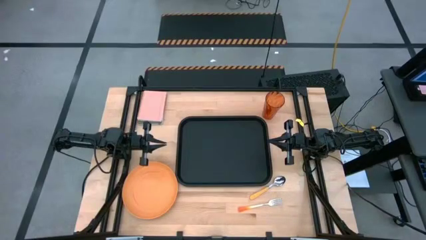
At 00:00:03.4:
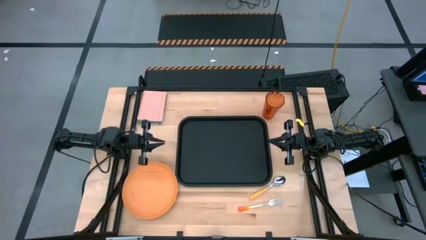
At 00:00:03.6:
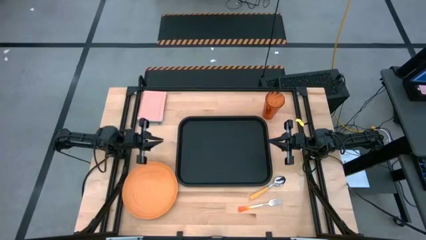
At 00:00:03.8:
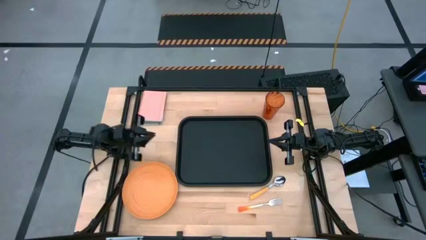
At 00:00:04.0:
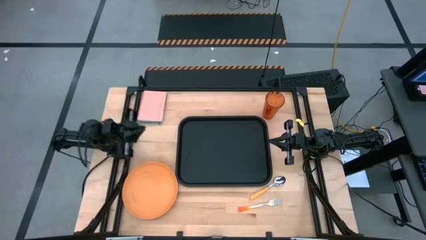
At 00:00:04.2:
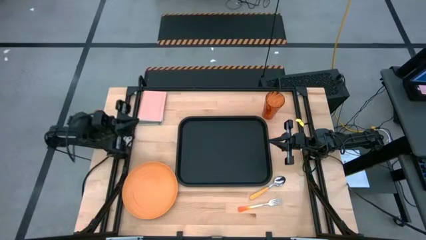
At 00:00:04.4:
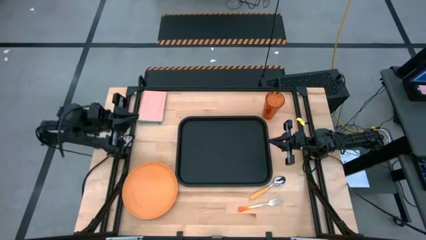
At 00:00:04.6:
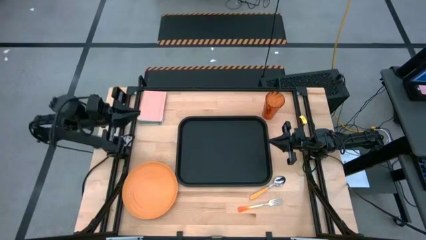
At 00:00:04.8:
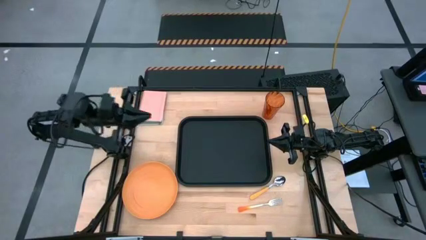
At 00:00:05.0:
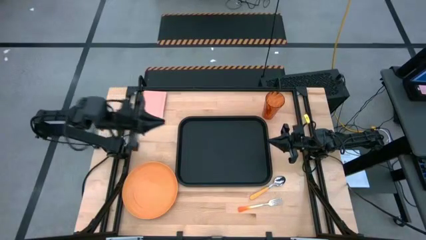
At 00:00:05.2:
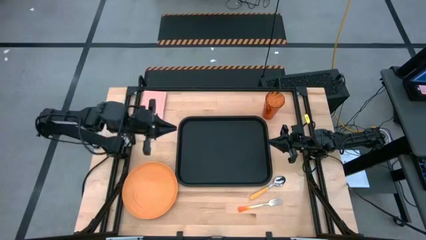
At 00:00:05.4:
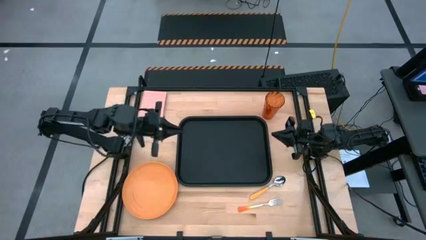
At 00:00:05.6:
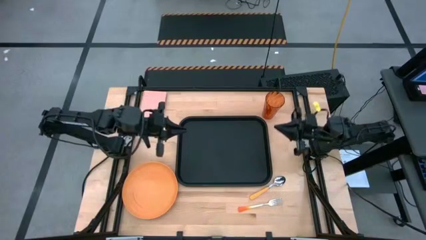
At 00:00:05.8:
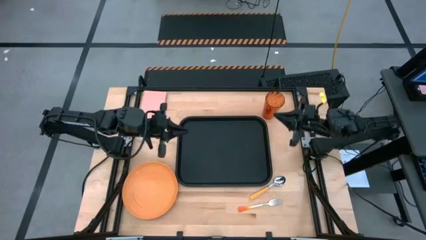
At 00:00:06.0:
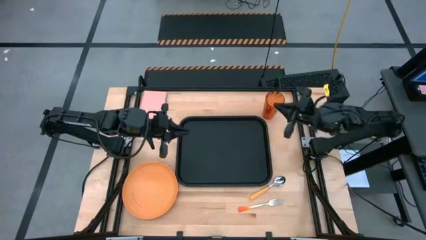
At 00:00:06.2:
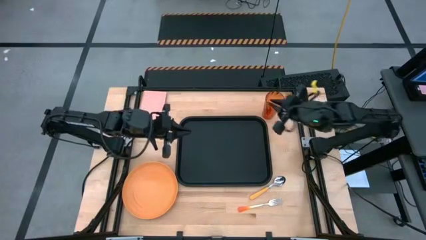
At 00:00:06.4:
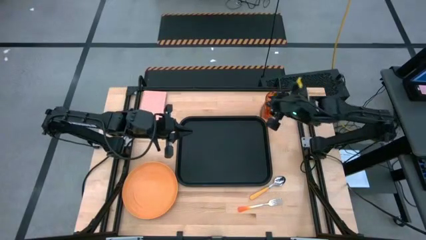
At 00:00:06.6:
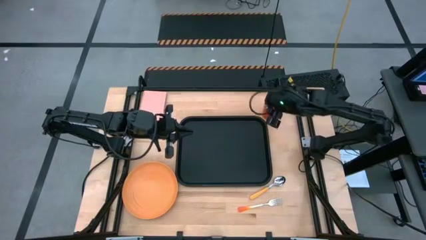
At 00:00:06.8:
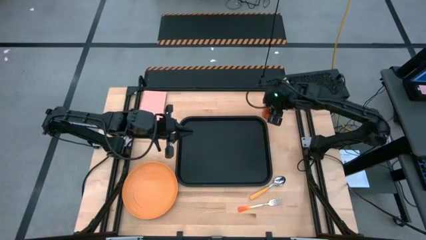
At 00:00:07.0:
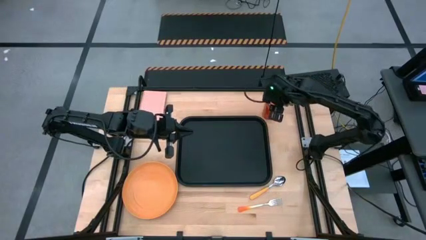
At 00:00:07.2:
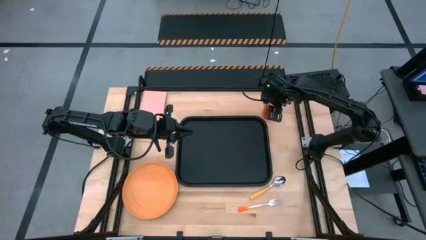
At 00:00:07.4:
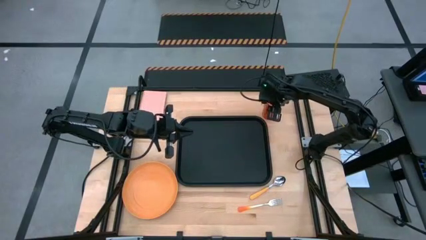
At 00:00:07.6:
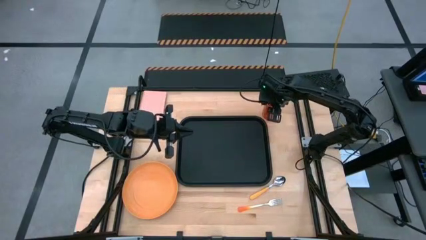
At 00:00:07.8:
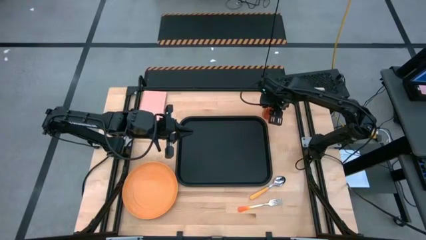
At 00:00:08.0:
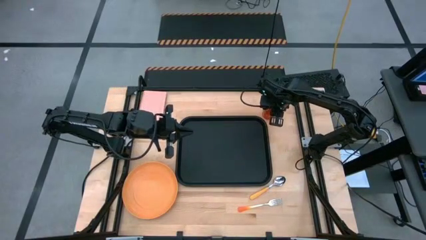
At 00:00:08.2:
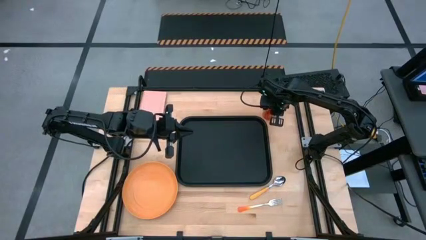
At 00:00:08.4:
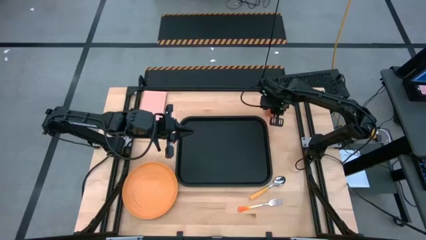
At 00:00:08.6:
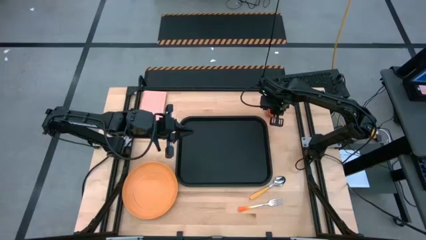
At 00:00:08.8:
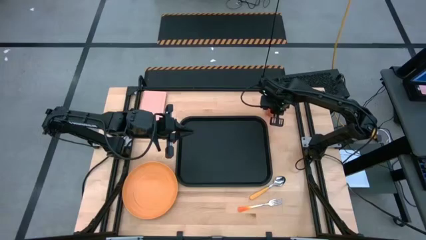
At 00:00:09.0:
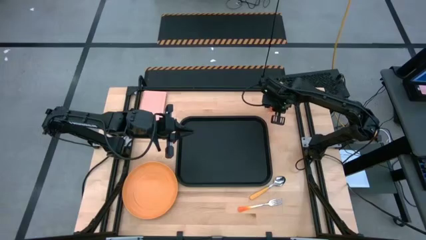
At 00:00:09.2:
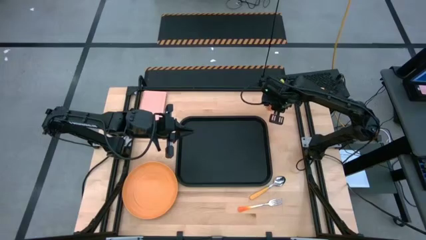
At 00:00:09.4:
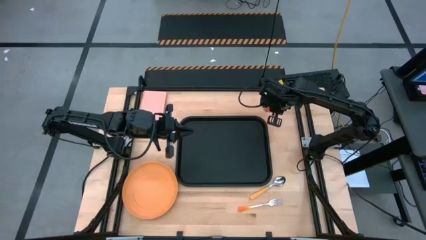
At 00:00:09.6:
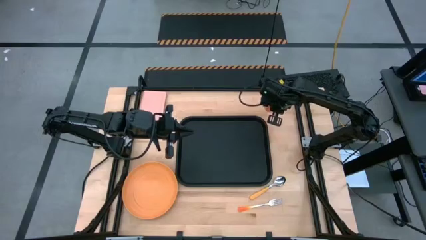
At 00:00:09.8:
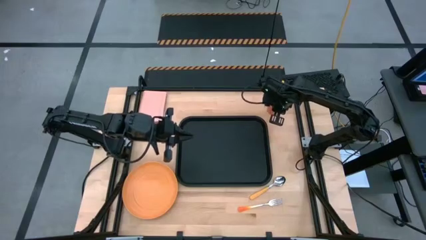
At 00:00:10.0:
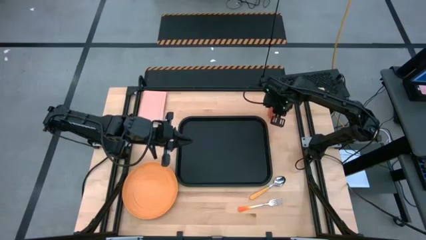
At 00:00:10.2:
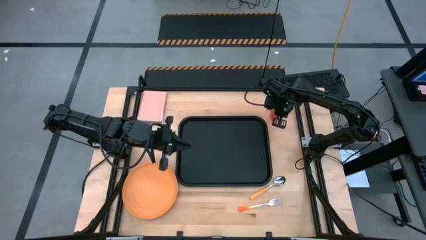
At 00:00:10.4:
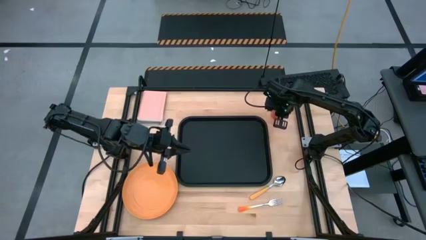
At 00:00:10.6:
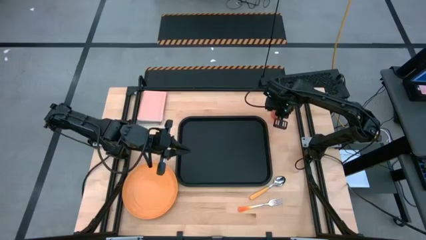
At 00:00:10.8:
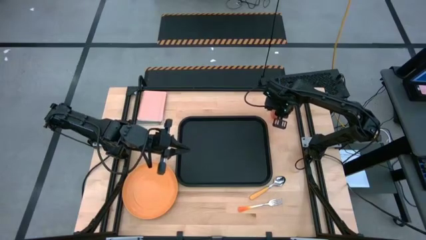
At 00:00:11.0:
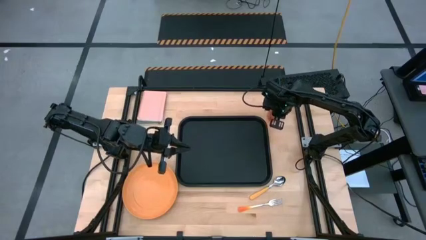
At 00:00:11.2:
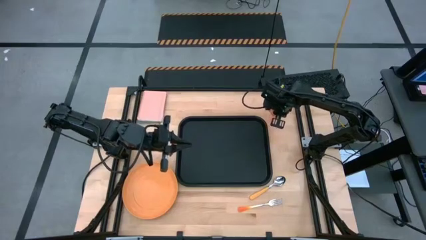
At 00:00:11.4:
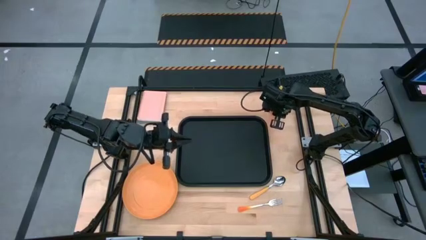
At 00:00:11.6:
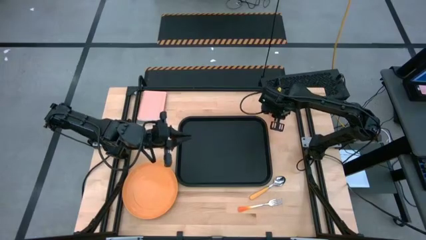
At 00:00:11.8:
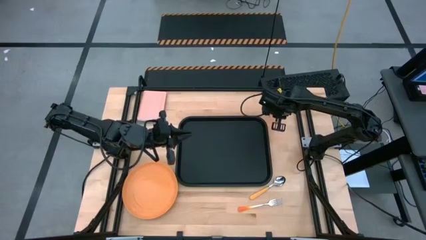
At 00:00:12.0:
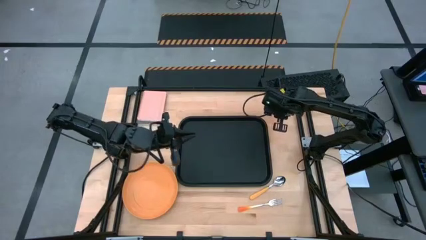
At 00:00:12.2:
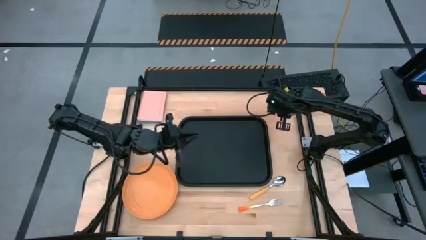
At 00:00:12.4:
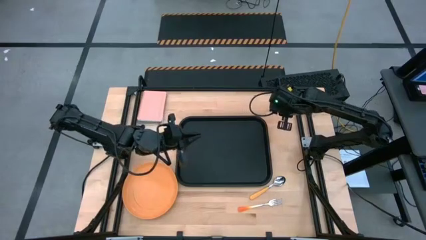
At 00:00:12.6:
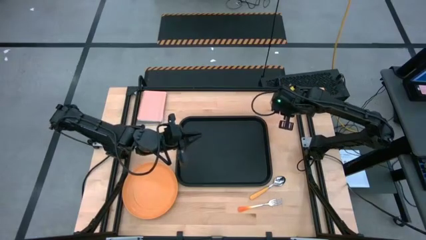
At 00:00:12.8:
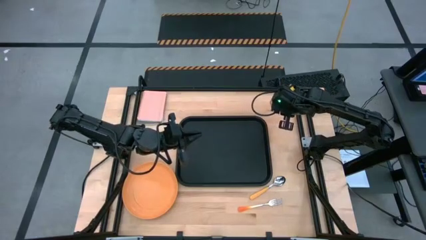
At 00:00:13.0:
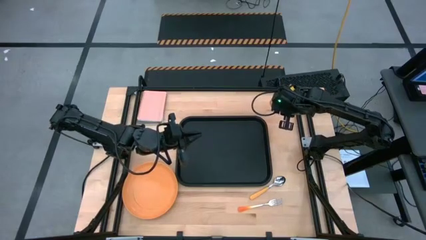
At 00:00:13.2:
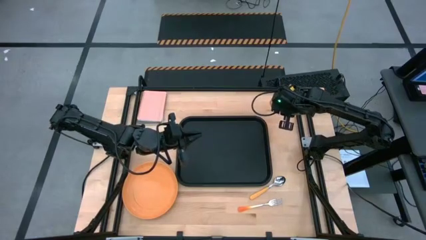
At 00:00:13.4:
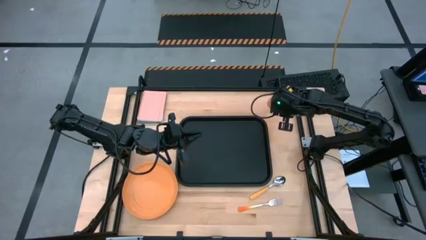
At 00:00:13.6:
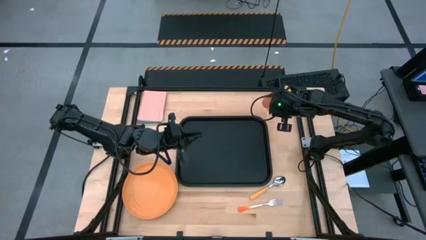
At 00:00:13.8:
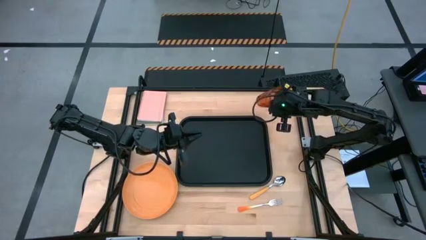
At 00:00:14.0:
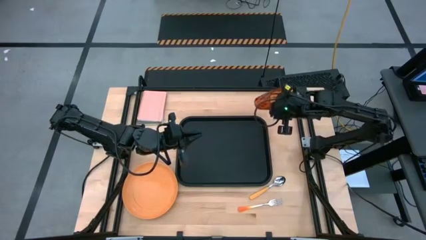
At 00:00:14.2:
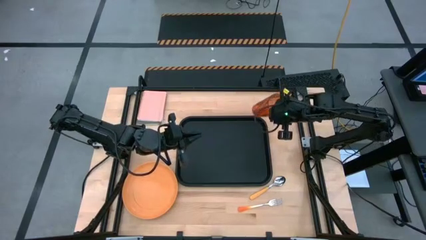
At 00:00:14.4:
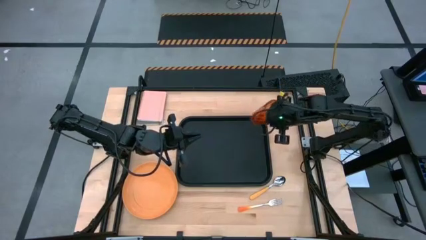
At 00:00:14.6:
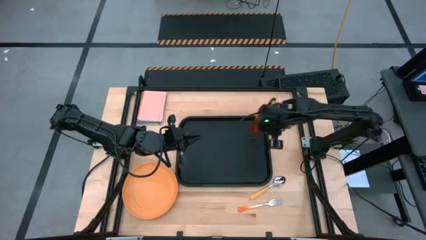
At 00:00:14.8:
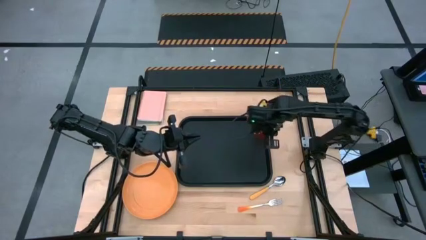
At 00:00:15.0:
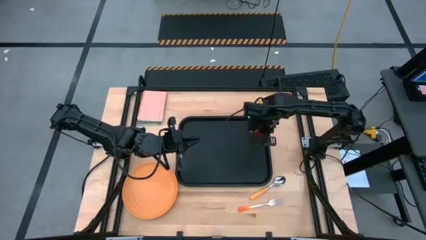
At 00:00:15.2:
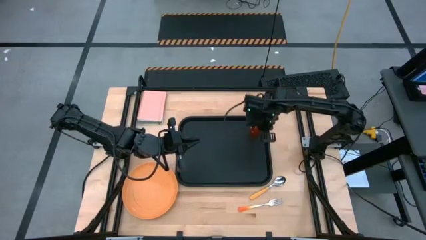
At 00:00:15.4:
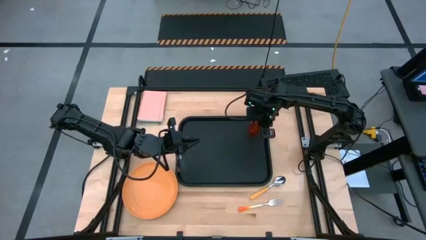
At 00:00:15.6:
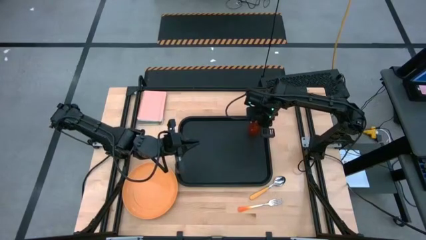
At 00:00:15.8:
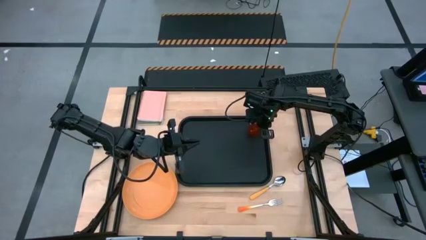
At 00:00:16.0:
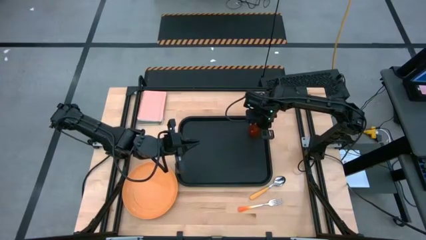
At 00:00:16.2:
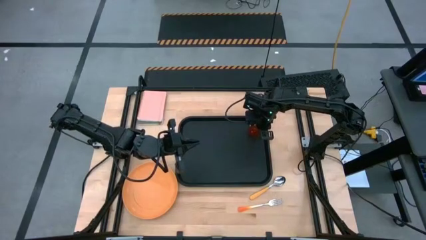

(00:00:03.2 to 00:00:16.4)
Task: Pick and place plate/cup/fork/spoon on tray
Put the brown glass cup on the right of the black tray
